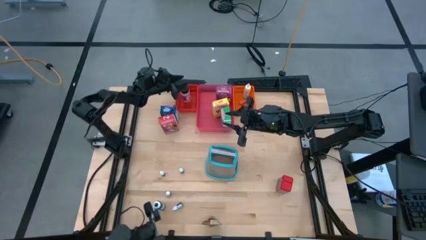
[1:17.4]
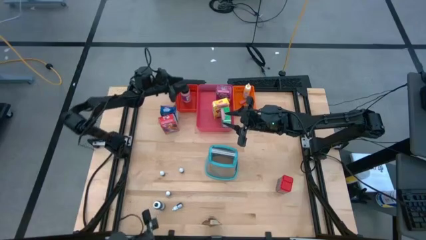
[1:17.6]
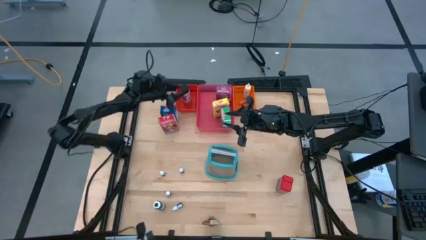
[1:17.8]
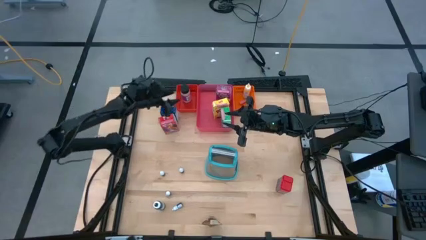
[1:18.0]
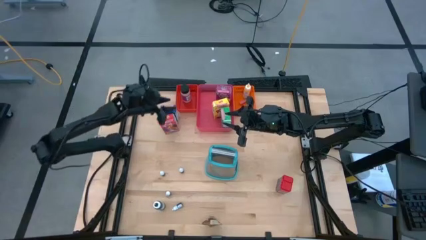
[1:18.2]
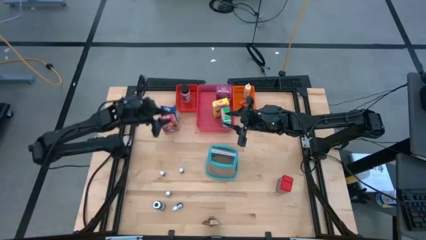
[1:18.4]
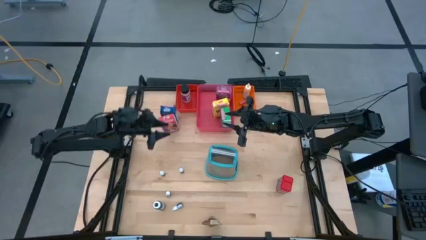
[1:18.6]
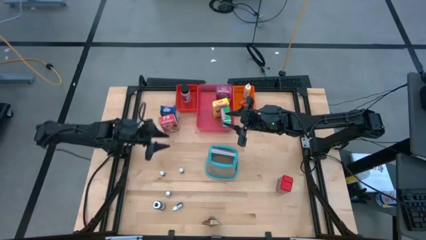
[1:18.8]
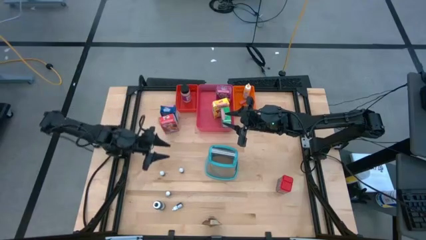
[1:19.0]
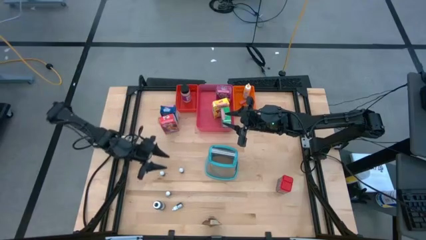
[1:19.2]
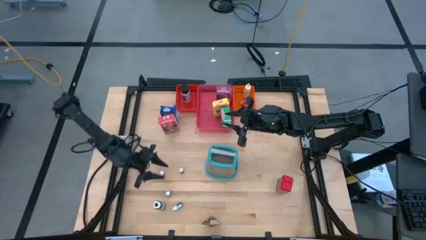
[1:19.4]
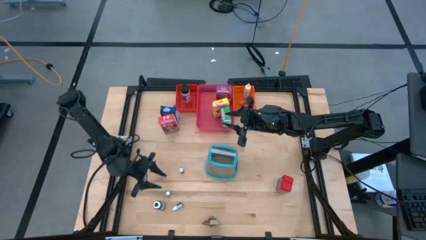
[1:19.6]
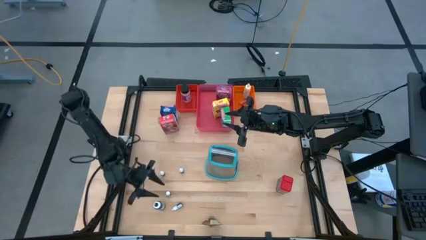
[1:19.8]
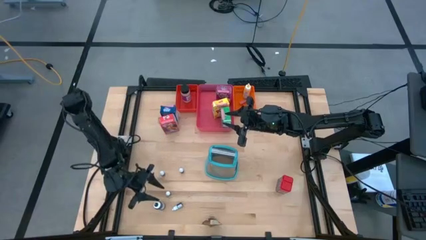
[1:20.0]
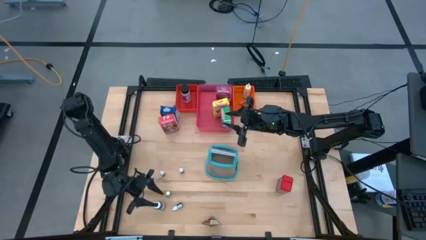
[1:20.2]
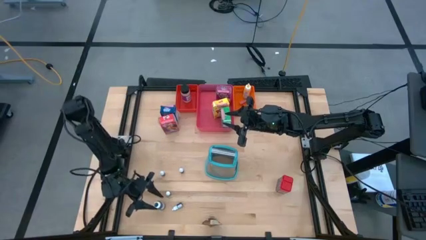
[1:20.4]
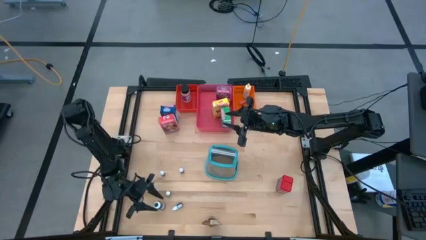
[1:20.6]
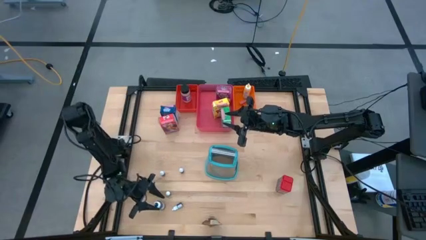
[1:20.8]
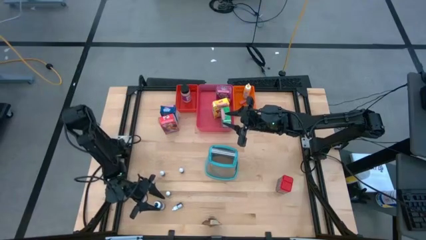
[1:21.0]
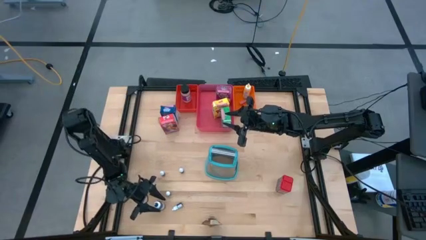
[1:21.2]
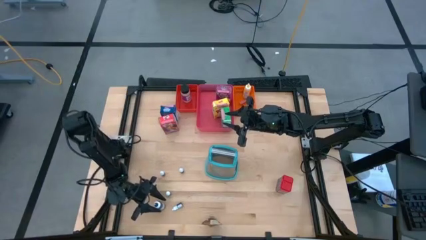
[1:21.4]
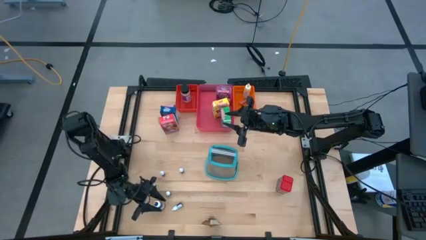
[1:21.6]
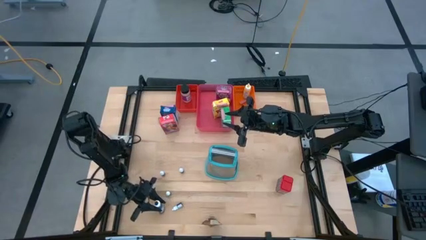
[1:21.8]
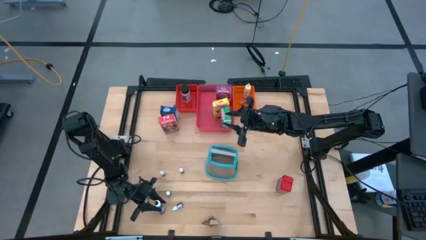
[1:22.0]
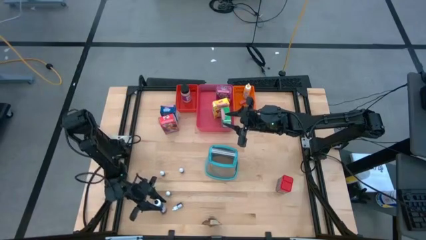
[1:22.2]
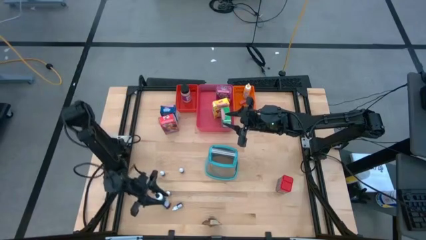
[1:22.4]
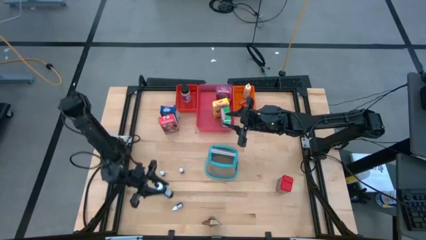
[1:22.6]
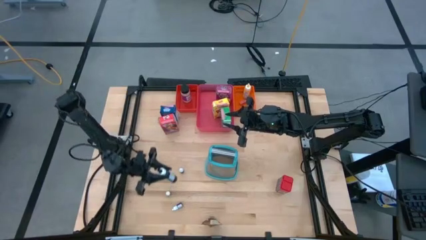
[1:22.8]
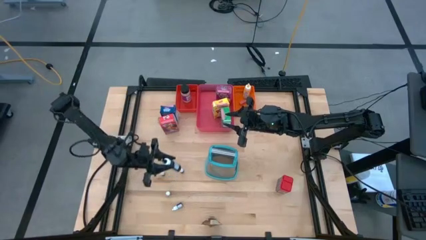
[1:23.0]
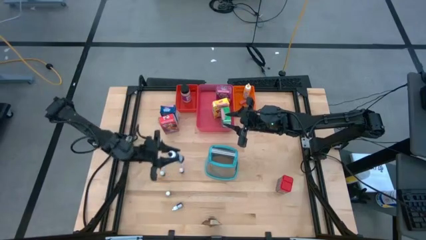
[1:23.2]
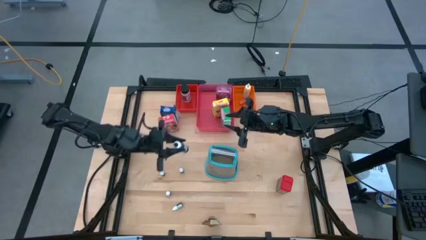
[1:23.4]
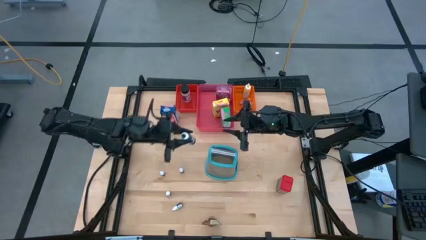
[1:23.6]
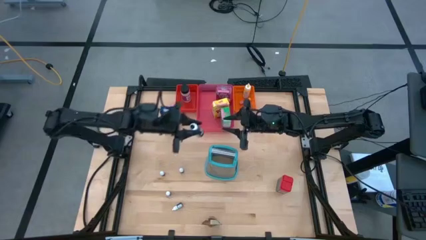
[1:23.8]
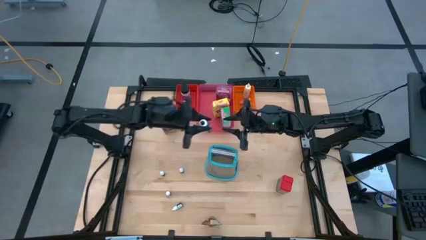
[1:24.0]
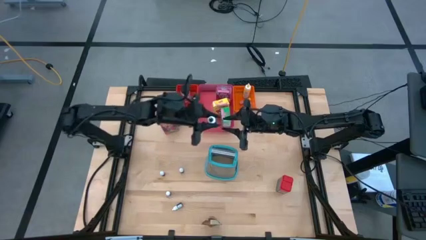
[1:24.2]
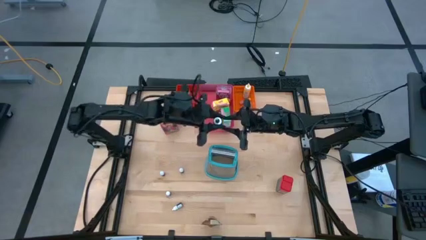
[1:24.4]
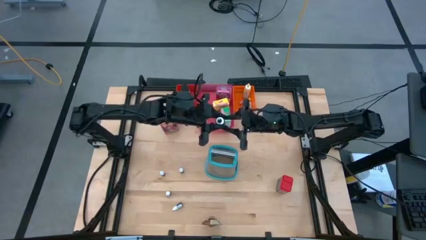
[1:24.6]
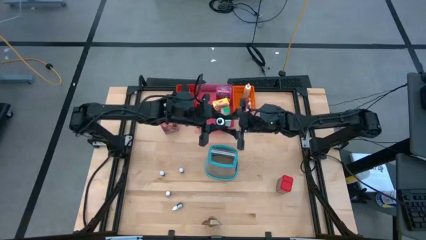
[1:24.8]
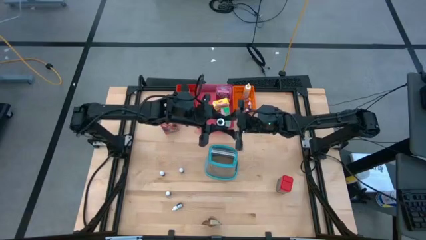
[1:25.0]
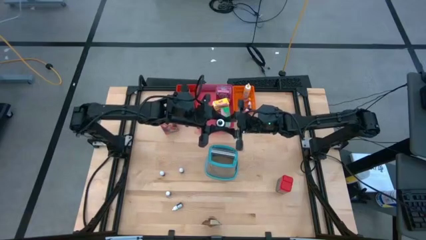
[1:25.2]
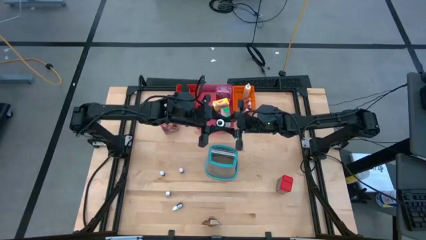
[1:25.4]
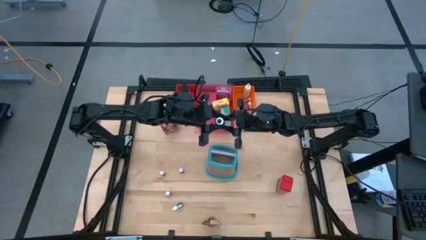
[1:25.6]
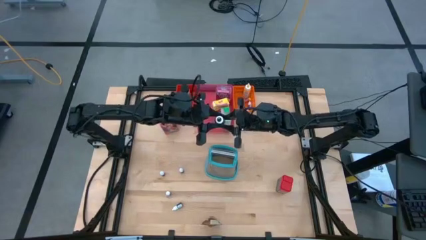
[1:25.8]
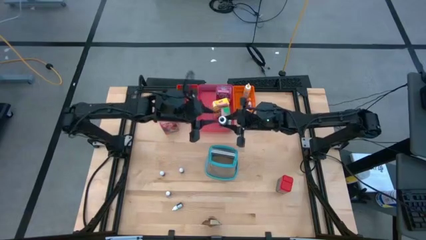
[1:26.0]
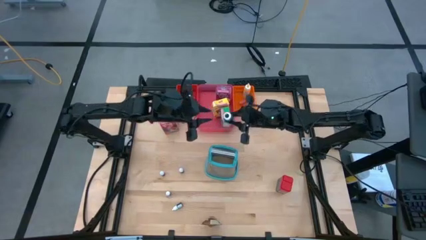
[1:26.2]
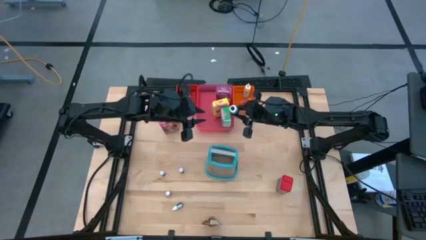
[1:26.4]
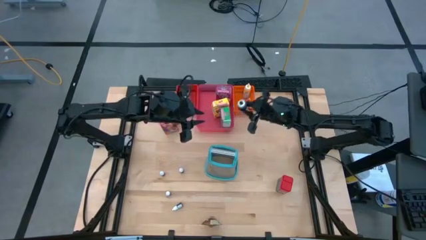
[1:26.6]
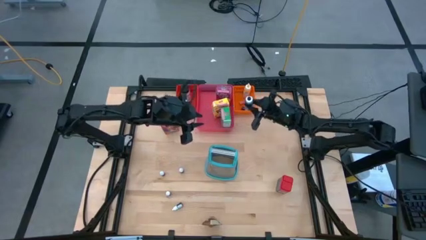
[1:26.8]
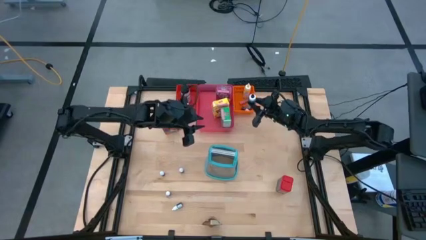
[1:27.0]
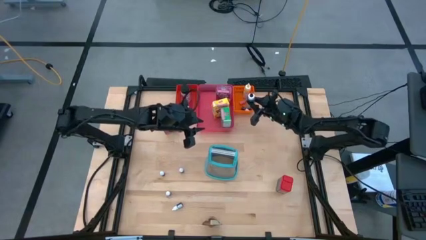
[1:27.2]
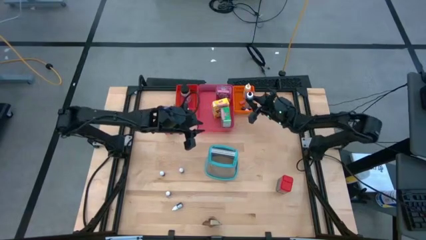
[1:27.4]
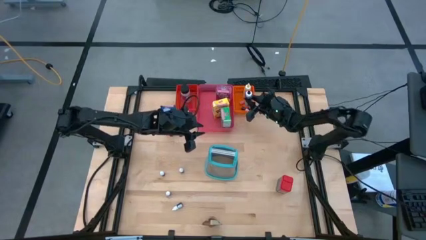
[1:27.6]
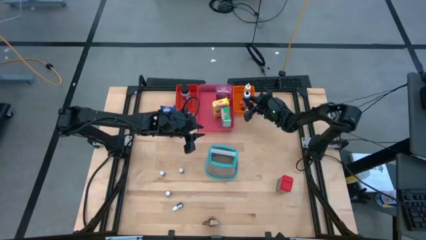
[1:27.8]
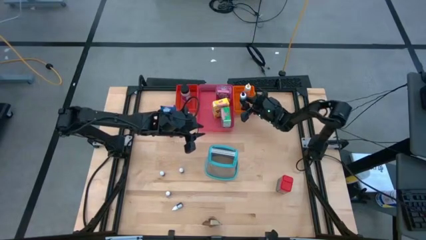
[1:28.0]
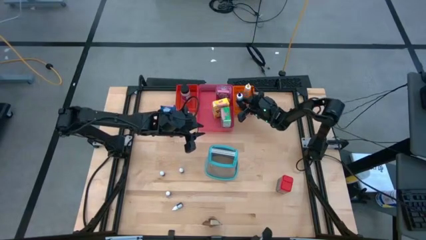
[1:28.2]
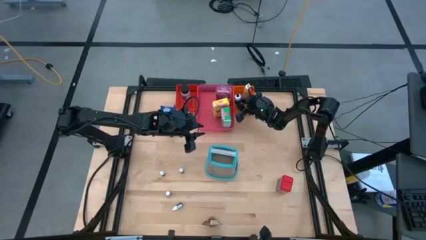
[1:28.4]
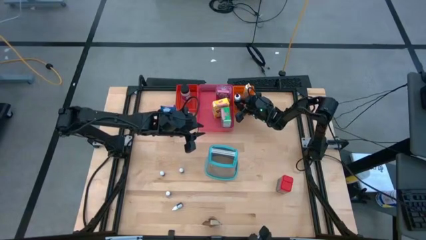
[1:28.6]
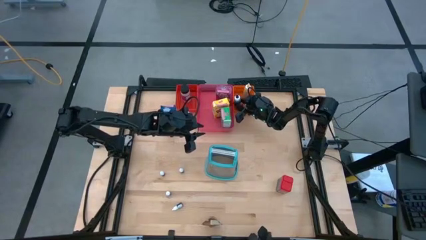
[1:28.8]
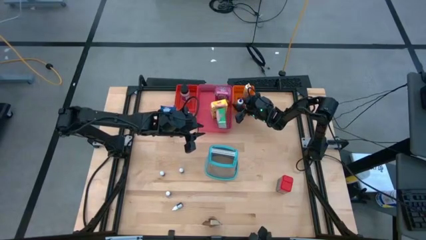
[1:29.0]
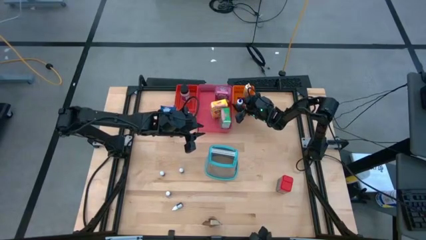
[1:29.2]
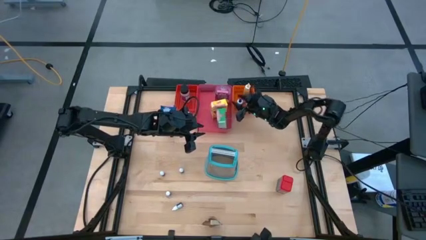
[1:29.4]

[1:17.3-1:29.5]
Task: Pick & Place Kitchen Items
Put the large black food coloring bottle into the orange bin

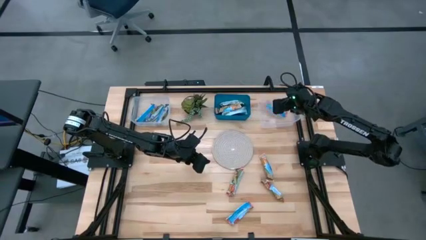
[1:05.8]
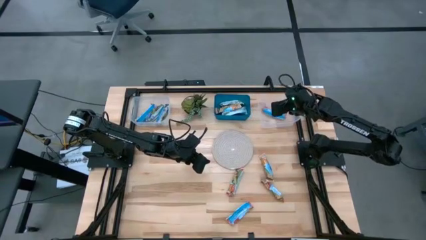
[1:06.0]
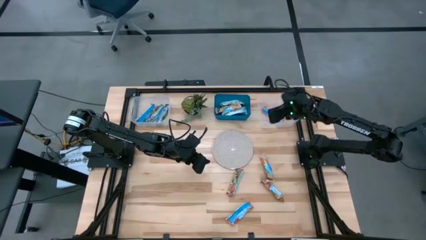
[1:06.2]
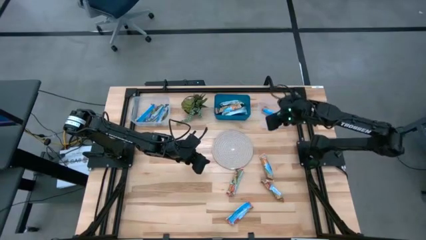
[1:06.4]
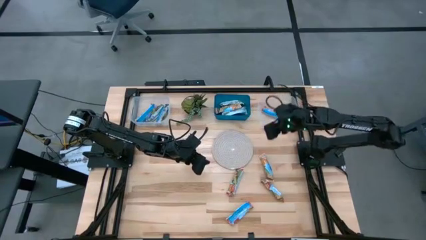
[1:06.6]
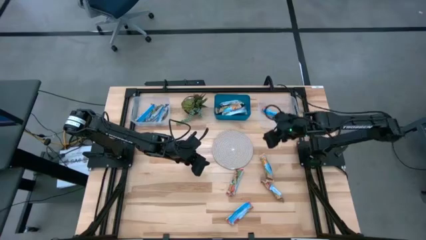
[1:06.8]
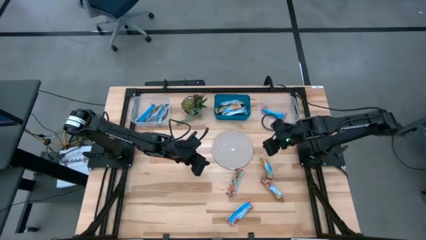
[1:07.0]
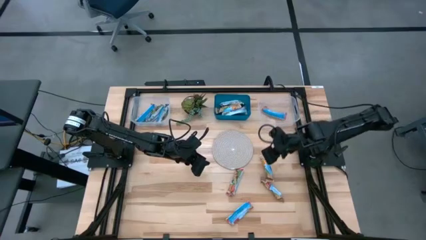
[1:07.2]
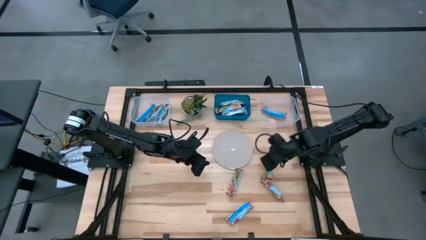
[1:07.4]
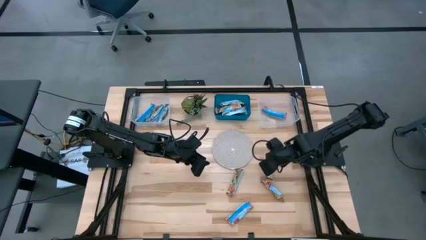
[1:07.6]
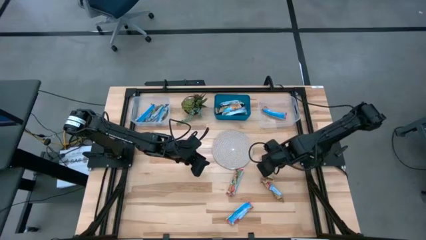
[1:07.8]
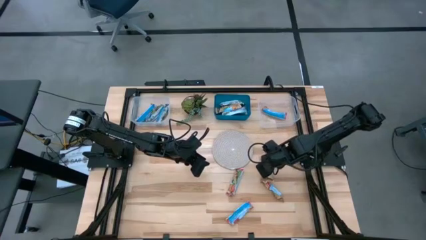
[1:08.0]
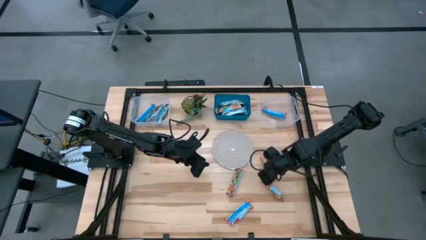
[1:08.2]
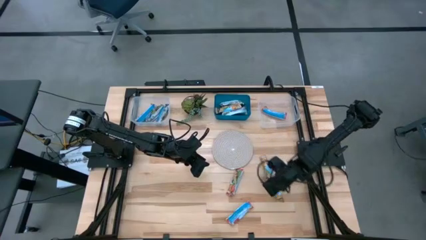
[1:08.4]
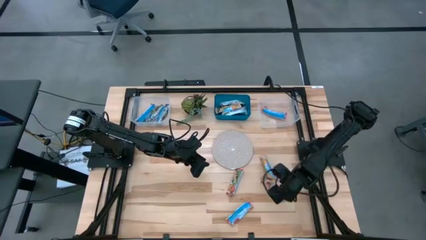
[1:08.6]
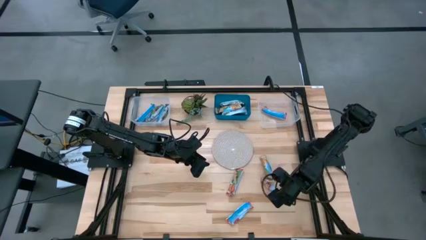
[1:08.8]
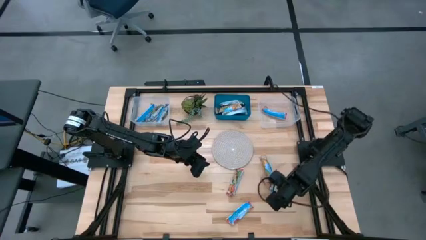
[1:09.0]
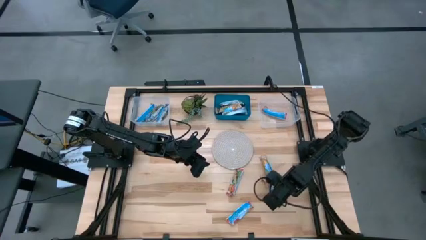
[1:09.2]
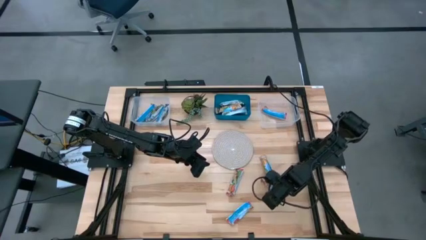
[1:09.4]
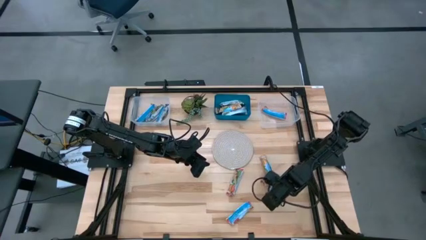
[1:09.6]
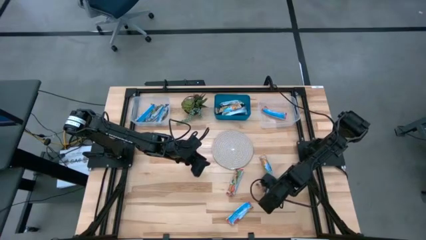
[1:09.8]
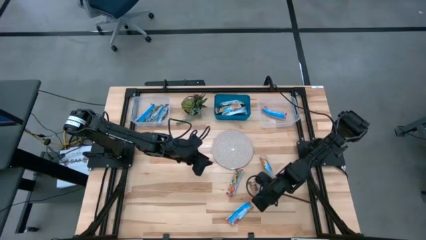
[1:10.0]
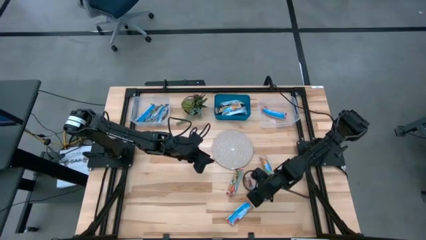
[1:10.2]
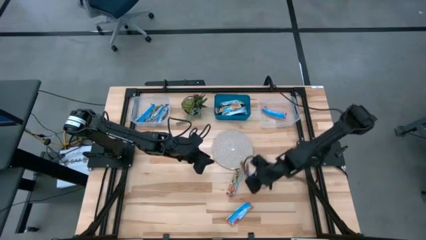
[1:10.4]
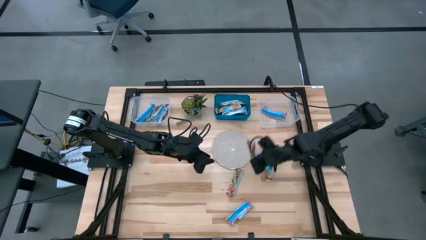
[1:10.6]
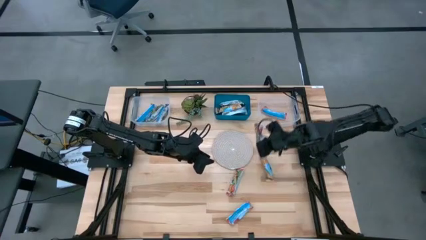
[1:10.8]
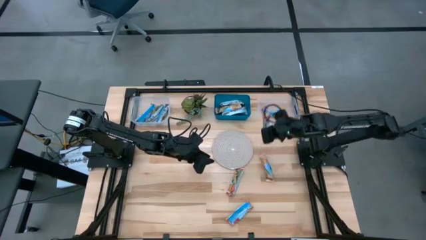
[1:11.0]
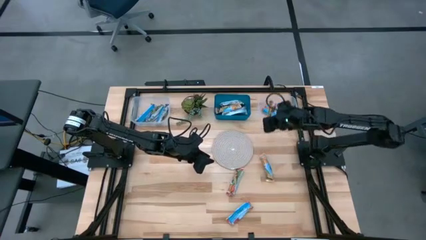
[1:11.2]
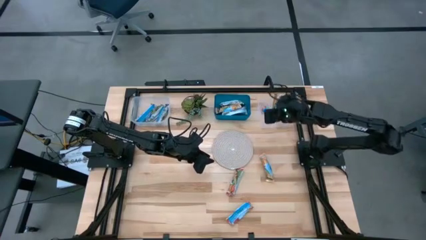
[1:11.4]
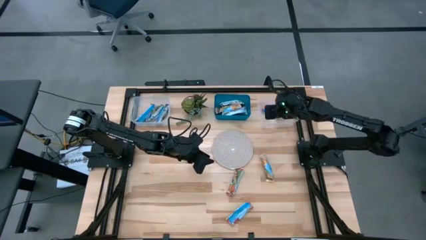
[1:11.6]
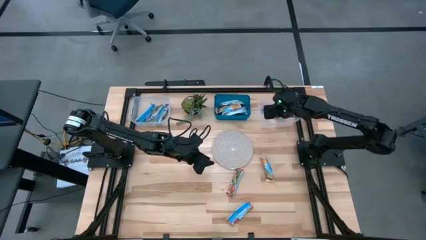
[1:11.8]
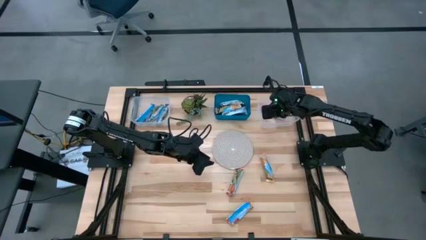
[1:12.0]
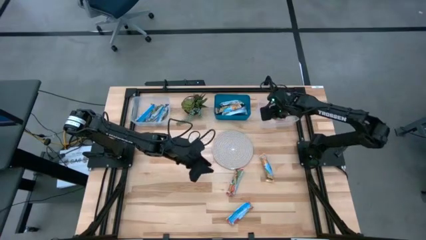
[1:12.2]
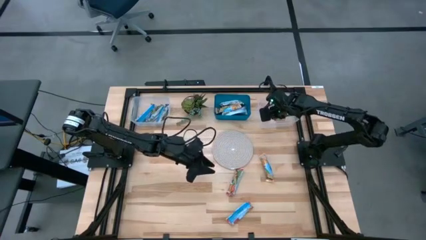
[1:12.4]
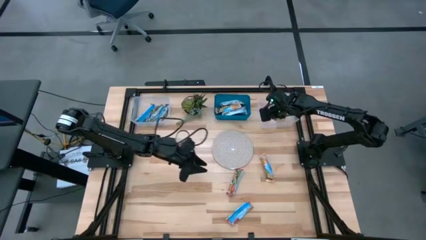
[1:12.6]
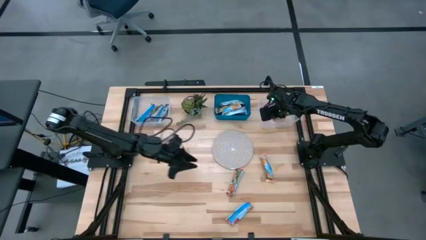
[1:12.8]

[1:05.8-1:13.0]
Task: Pick and place Granola Bars by type
Put the red granola bar into the right transparent bin
